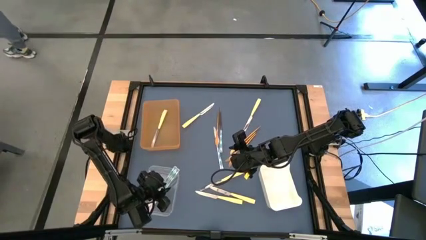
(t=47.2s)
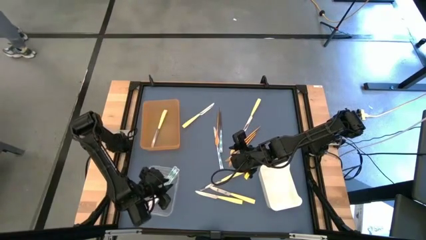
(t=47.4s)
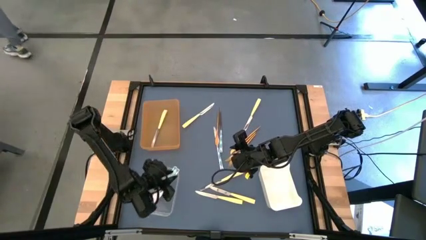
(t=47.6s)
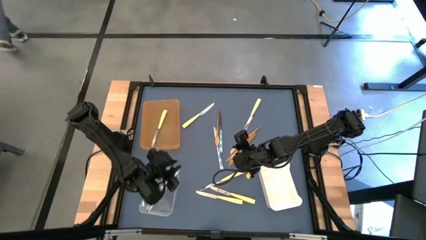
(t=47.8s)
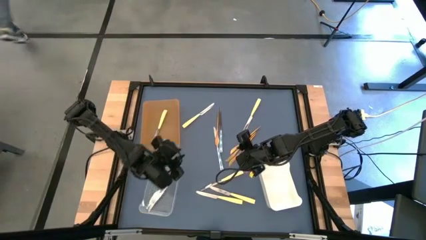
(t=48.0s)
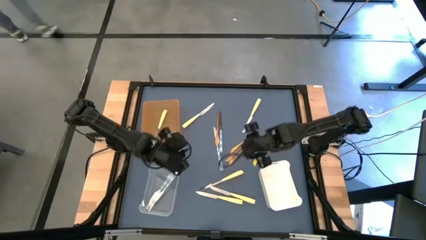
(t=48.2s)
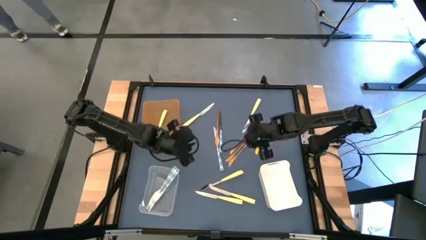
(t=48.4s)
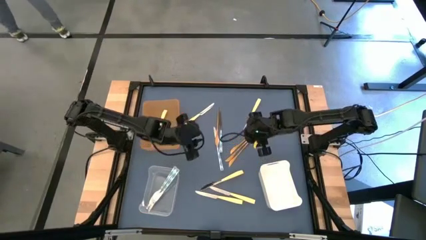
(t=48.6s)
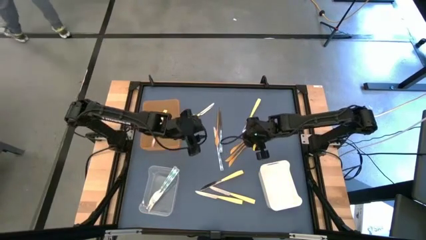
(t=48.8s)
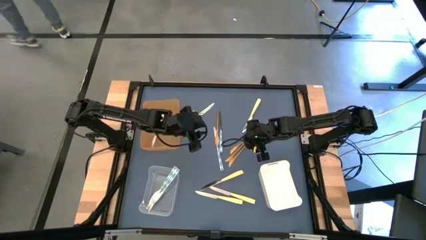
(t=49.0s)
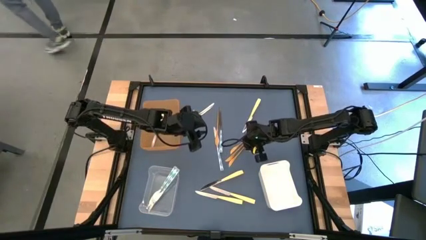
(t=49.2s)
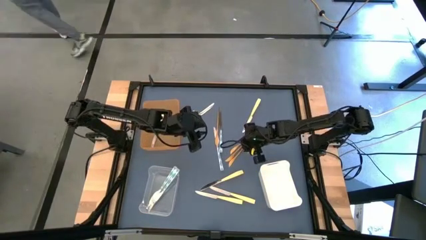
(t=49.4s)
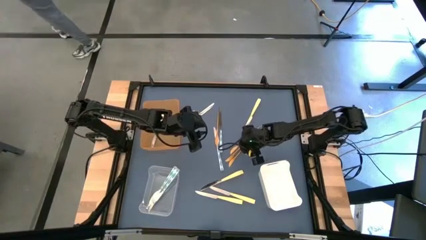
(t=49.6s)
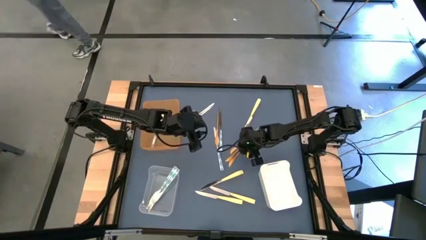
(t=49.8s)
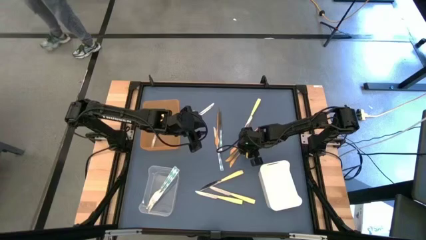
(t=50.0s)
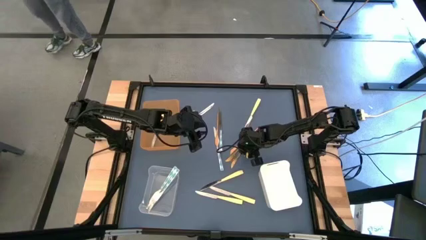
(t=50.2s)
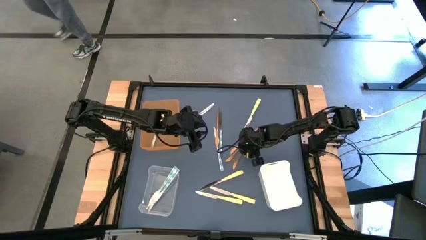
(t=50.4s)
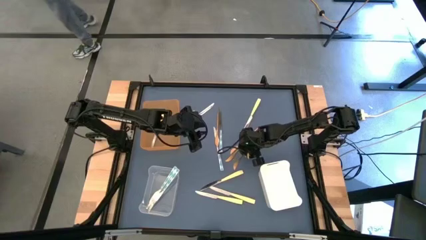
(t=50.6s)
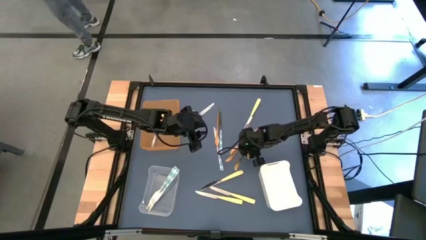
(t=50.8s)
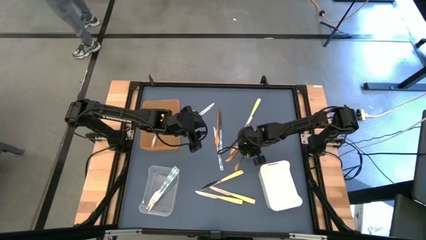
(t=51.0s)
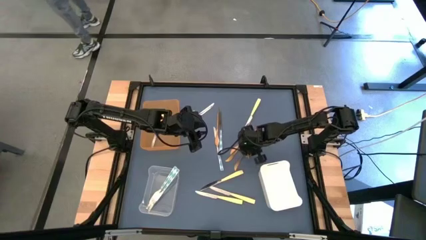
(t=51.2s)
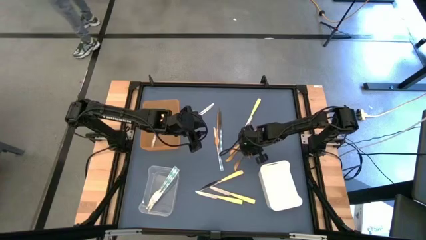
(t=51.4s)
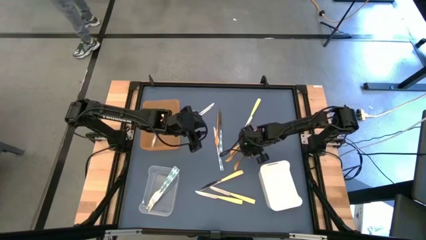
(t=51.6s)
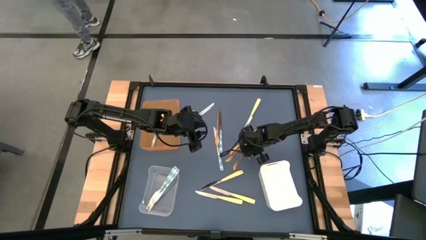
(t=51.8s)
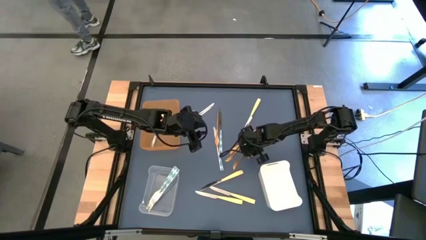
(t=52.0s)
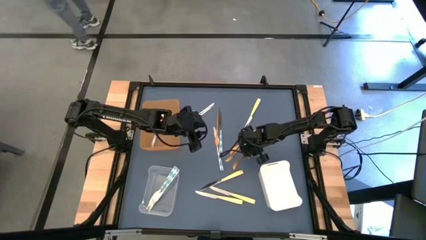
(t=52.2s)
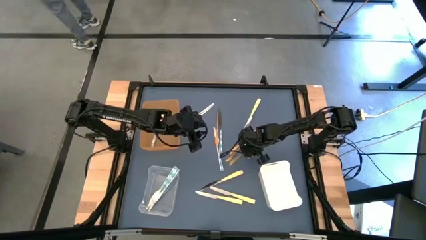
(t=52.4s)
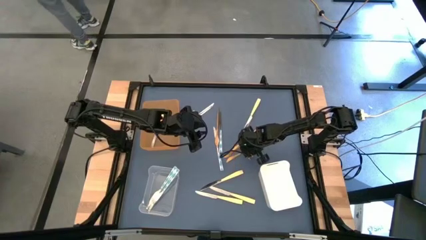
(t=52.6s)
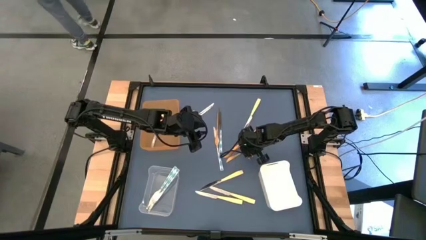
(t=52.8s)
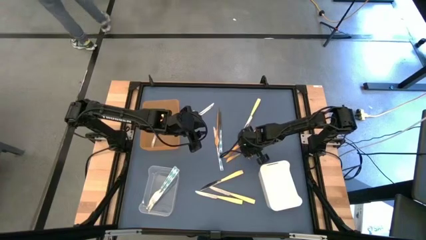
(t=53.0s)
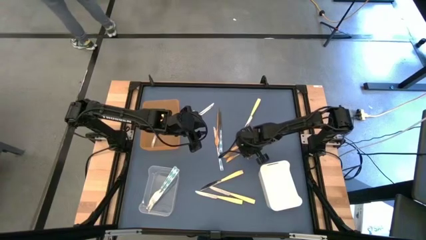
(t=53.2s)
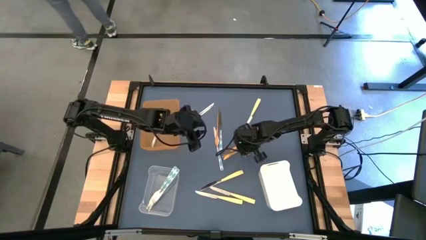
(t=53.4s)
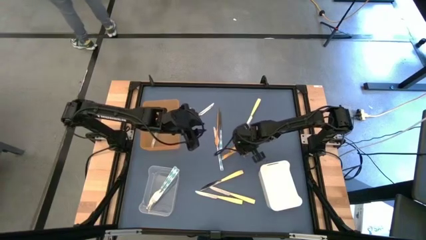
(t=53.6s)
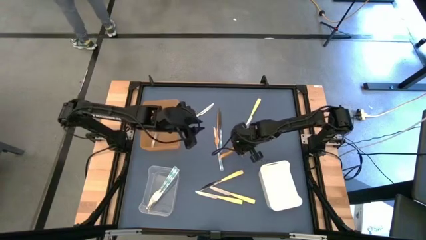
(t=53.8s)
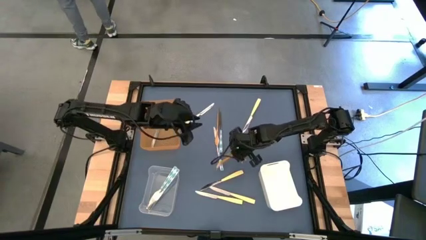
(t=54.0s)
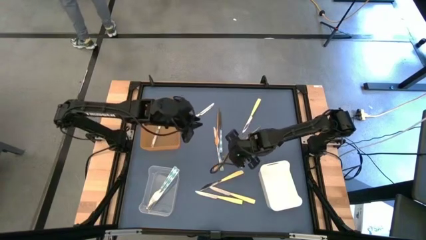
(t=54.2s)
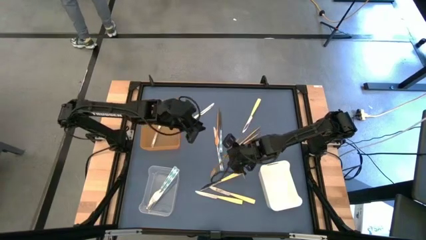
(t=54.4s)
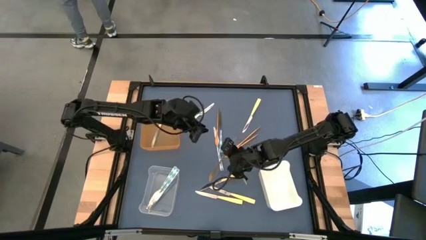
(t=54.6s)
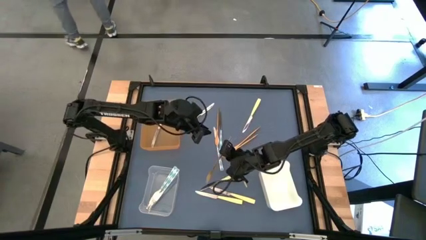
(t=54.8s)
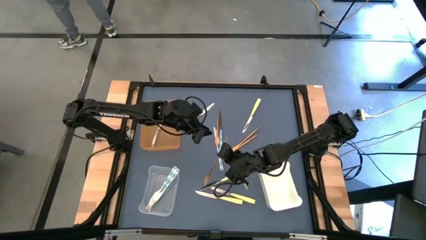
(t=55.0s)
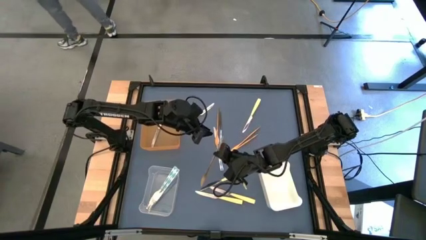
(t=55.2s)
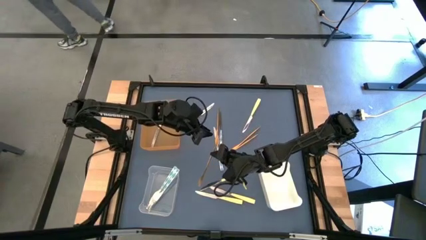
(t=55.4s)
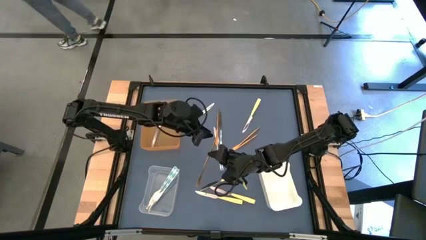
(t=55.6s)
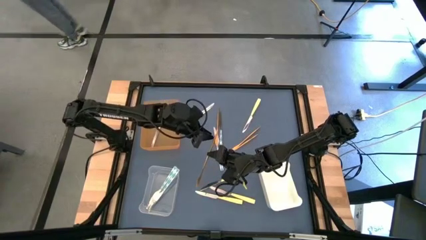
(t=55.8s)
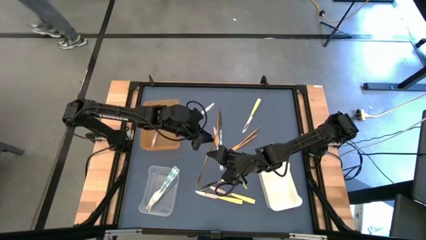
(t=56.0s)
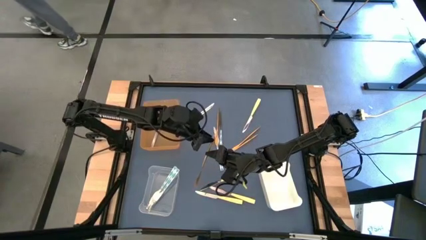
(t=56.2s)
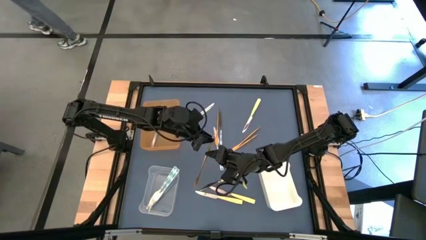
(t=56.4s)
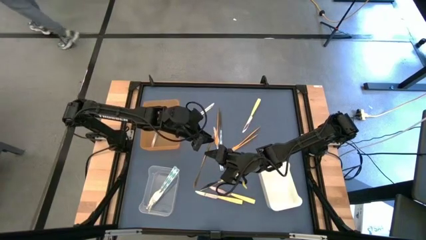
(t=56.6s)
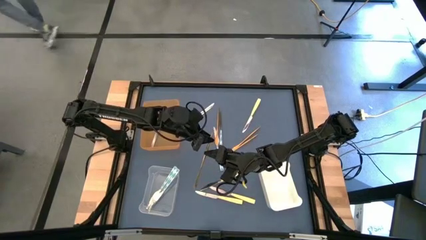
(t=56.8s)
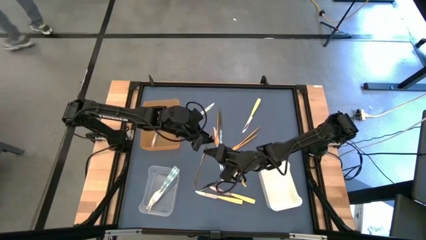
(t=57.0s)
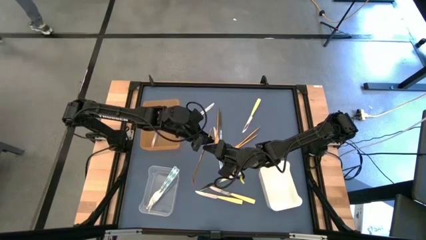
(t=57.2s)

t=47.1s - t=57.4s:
Task: Sort silverware by color (type)
Put the gold knife into the white bin

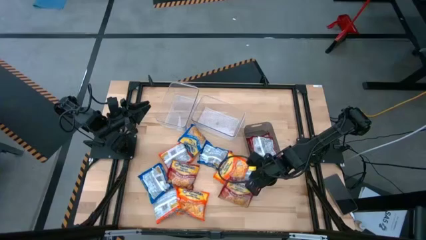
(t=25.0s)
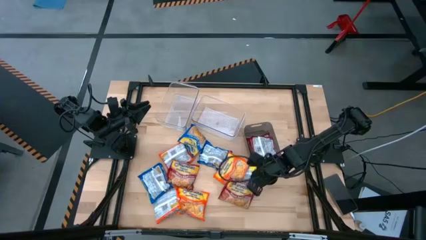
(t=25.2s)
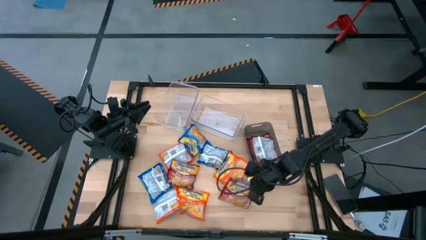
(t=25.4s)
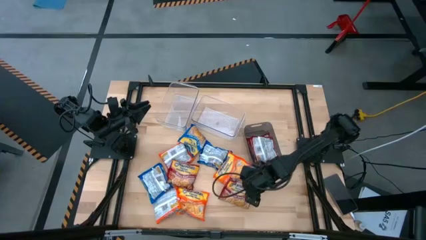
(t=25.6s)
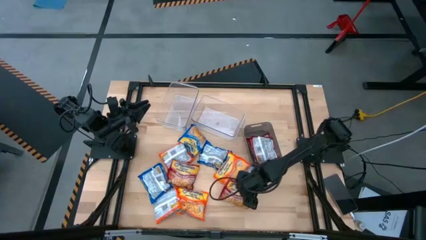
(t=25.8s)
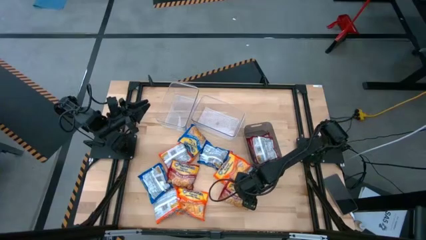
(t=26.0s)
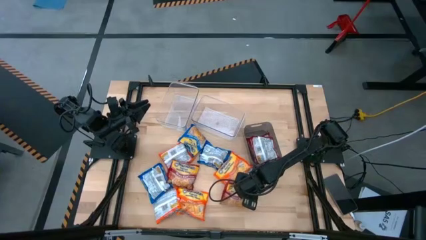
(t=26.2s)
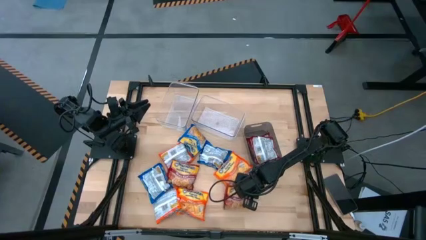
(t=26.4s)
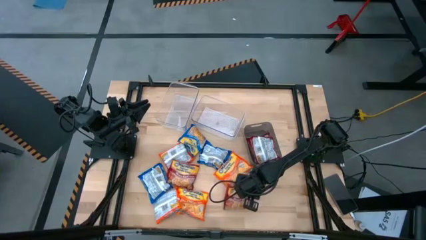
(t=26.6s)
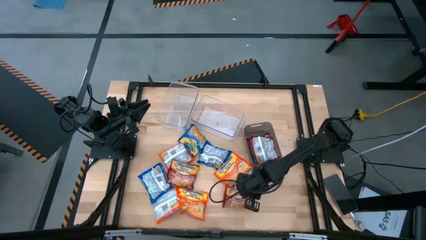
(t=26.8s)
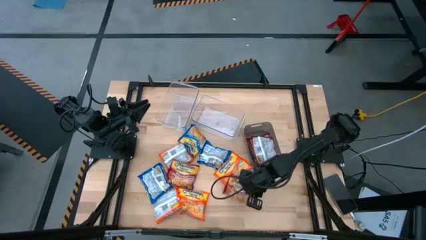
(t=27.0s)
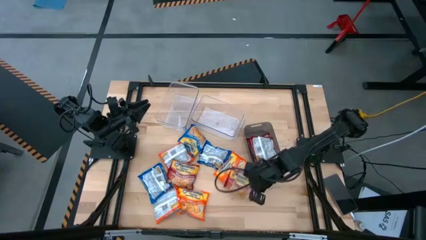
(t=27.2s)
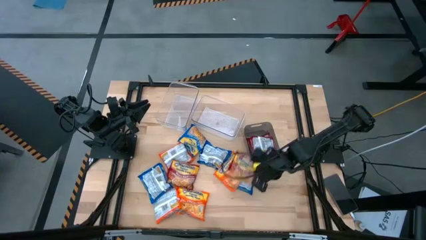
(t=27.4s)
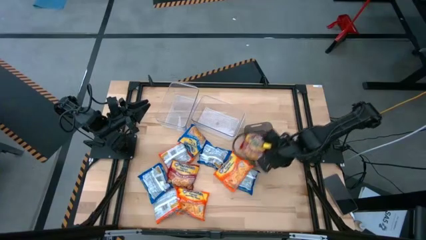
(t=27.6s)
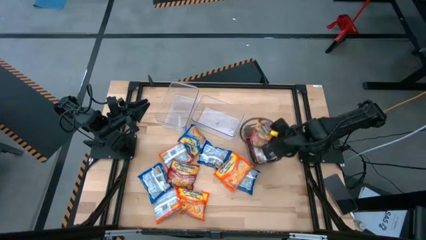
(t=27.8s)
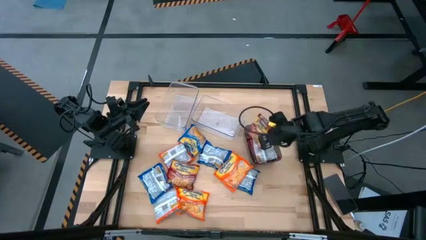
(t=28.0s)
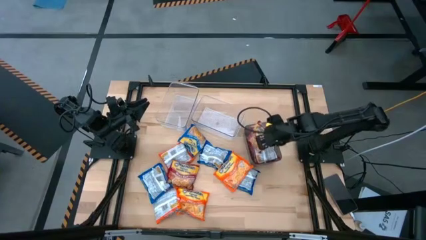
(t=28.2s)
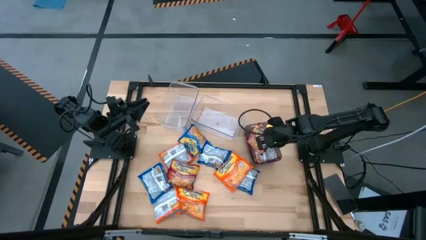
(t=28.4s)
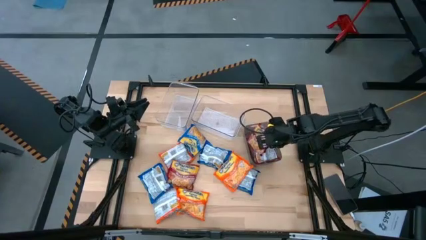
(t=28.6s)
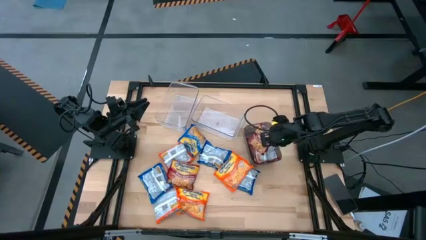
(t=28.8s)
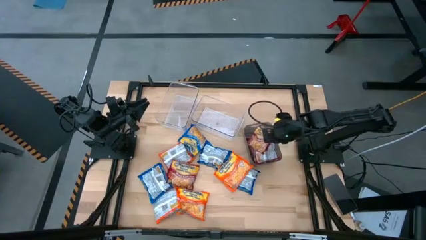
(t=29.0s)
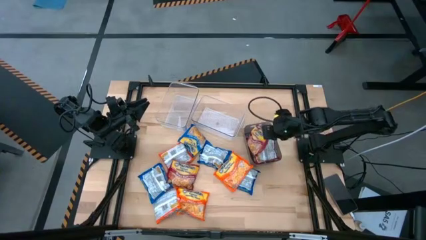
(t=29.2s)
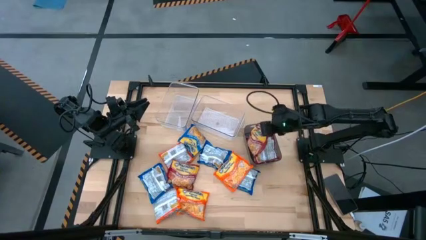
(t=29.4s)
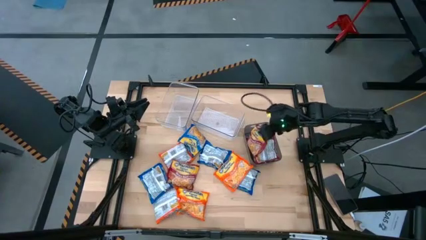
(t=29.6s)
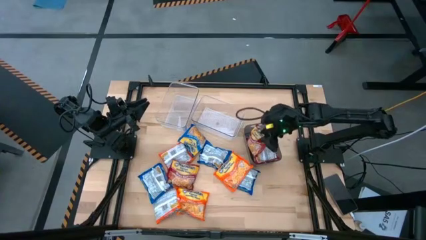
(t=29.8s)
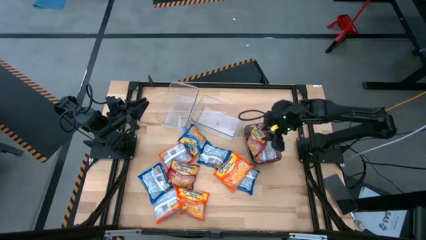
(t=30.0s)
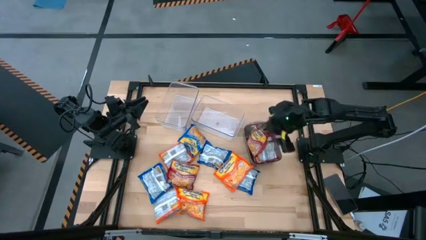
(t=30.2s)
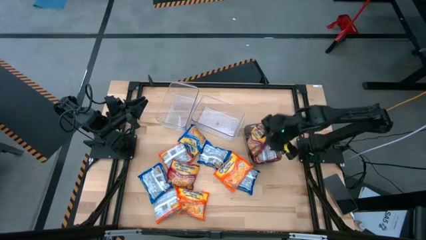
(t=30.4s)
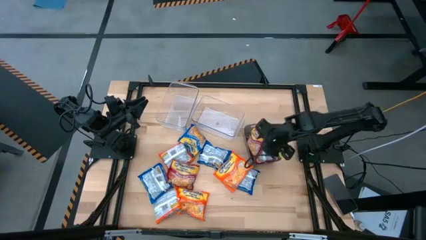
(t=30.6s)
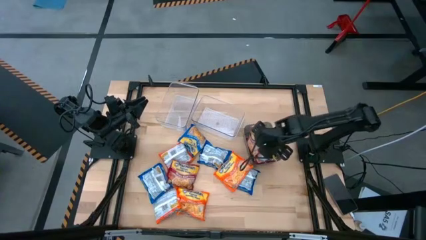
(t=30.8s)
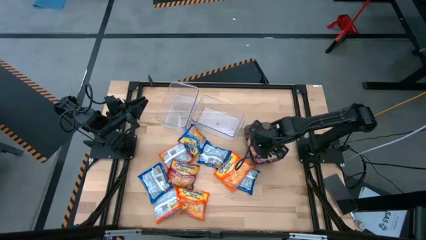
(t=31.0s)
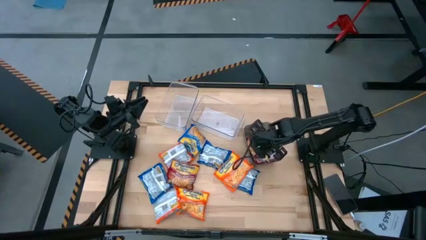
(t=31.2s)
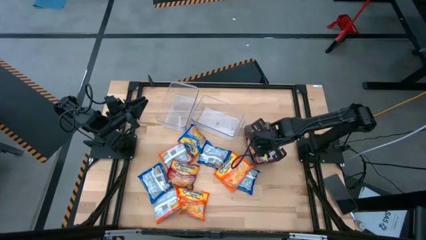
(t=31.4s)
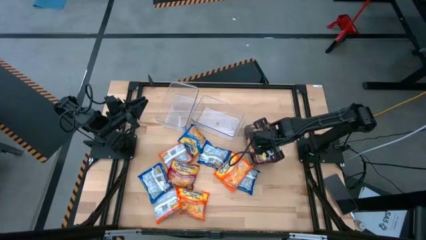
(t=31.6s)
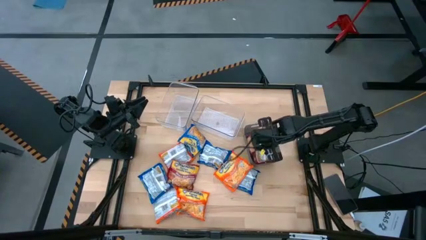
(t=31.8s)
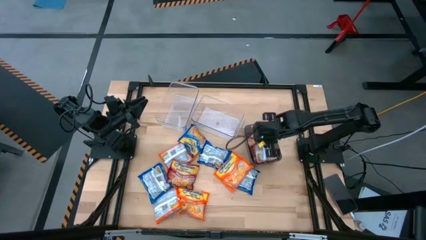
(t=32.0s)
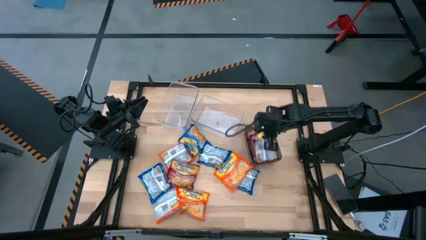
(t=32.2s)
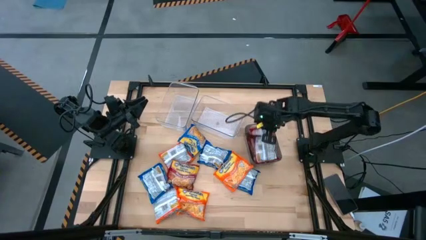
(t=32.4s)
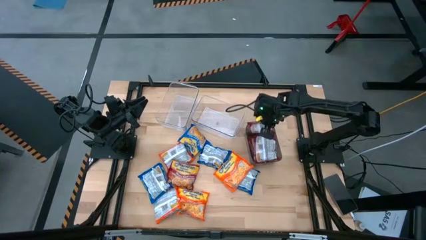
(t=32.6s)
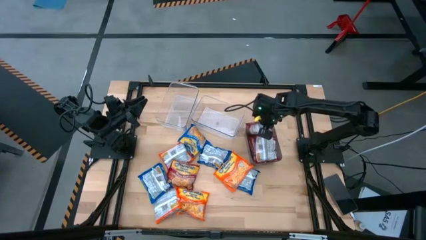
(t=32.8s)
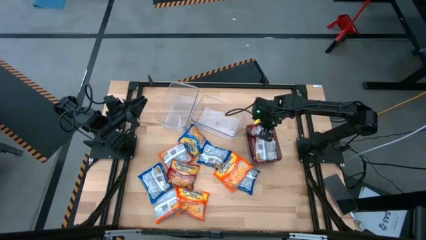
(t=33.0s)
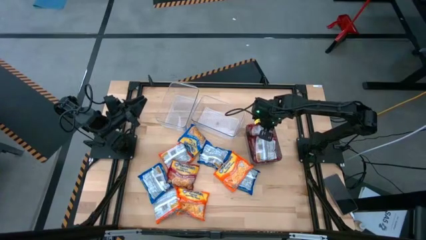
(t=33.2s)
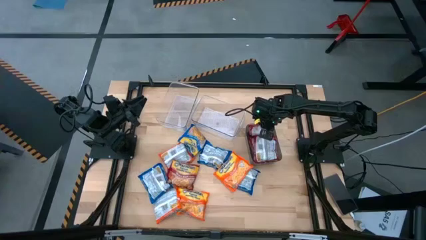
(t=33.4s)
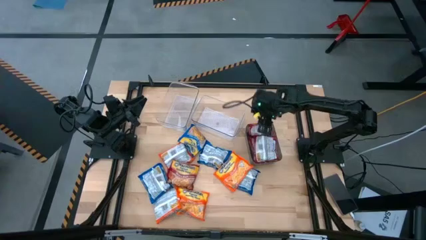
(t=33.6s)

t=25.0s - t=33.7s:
Task: Sort Maruchan noodles
Put the red noodle pack into the black bin
